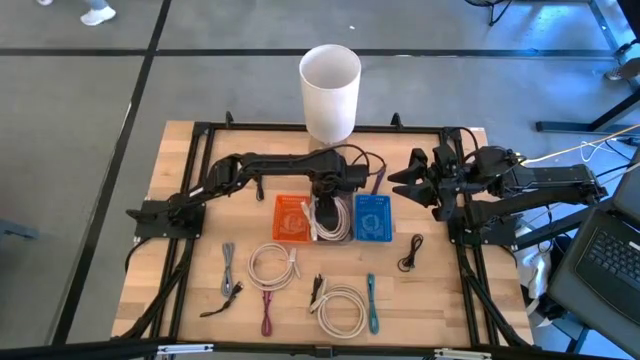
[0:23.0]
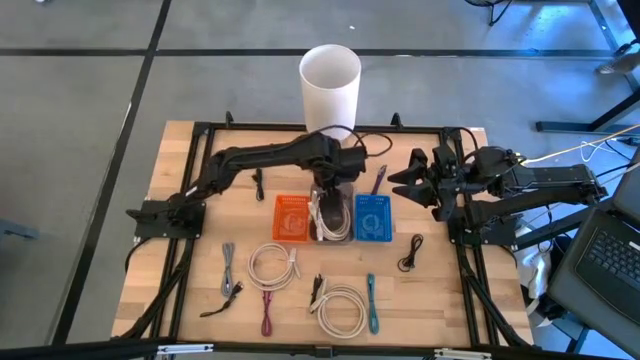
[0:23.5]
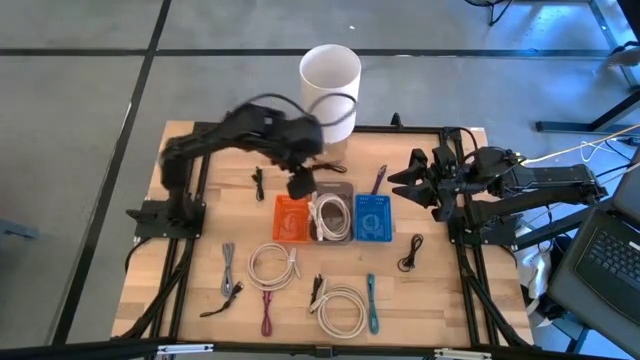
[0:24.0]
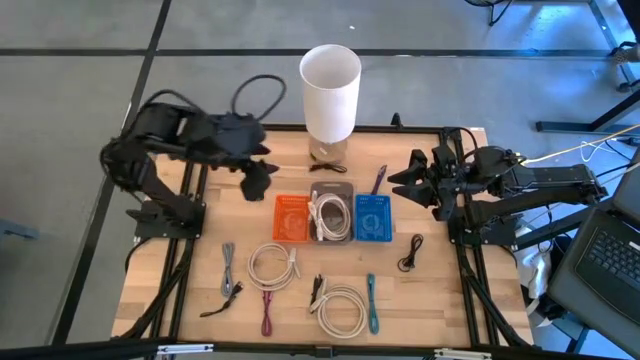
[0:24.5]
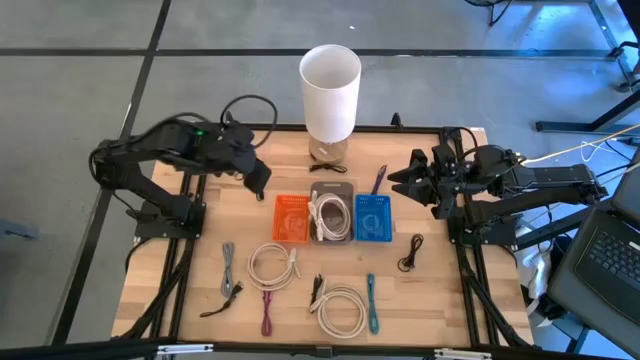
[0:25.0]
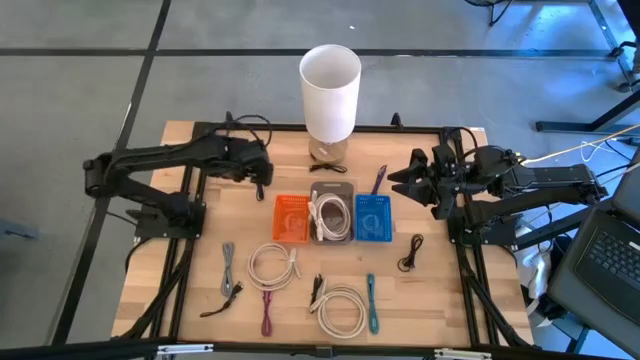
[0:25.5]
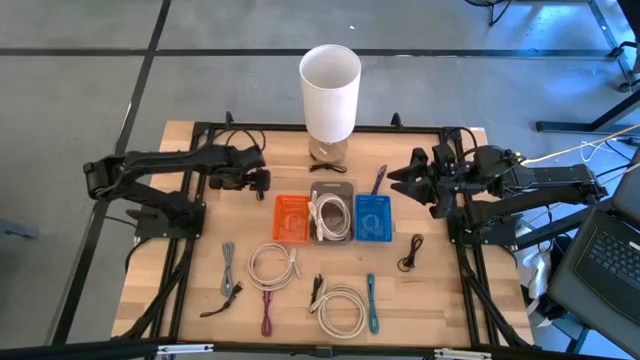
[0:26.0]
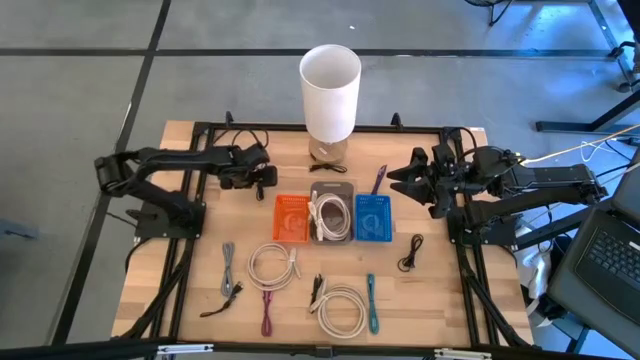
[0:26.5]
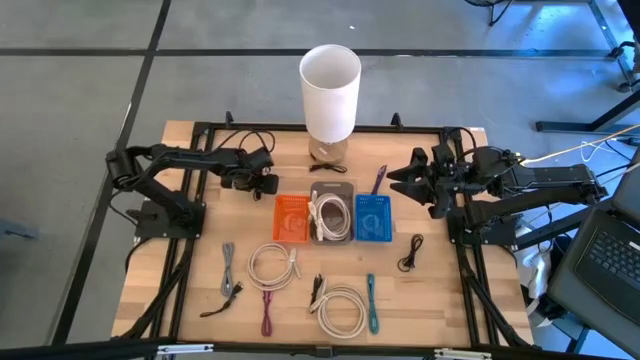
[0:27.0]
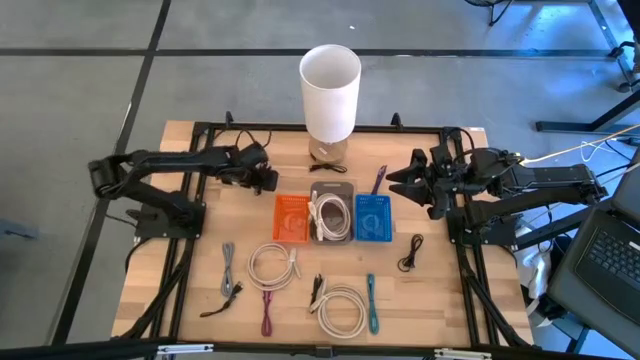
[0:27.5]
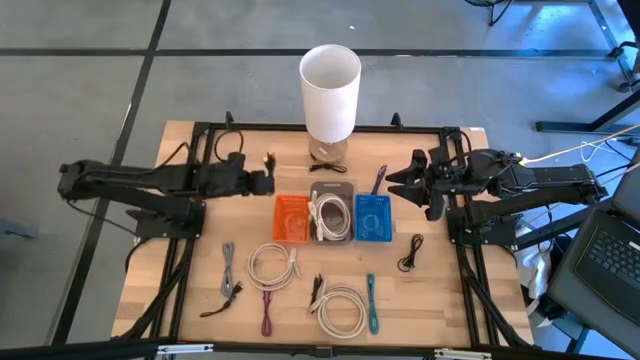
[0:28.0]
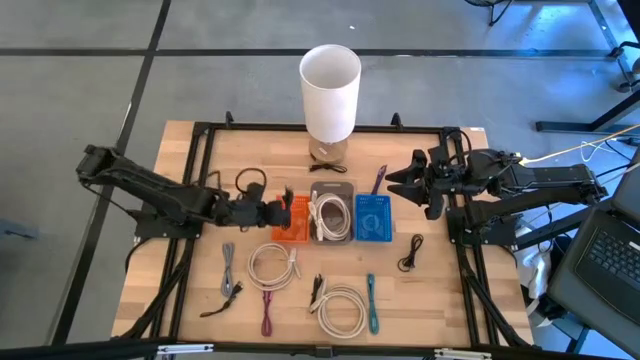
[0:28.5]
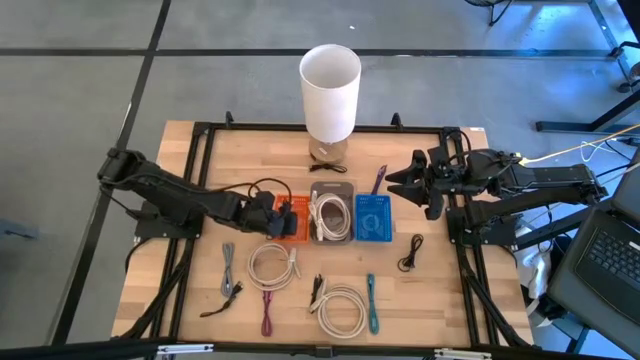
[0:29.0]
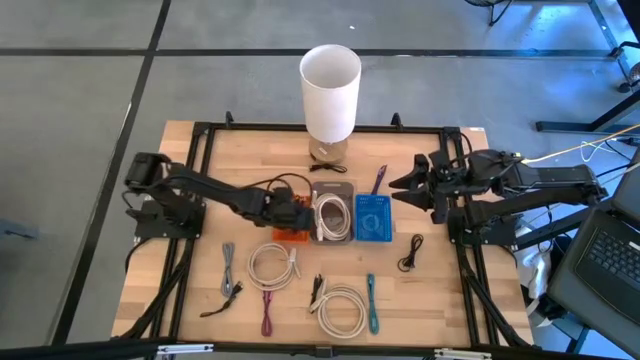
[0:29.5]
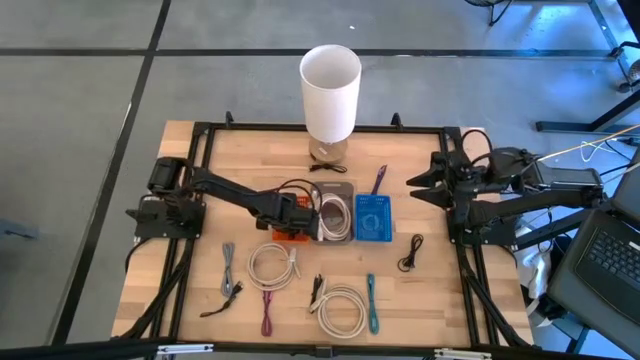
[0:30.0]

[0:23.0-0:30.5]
Task: Pick & Place USB Port
Put the black charger cable into the orange bin

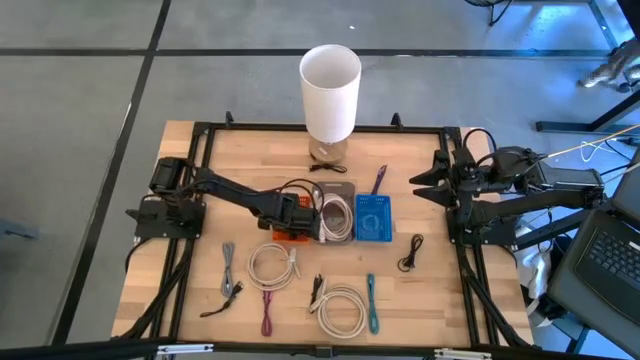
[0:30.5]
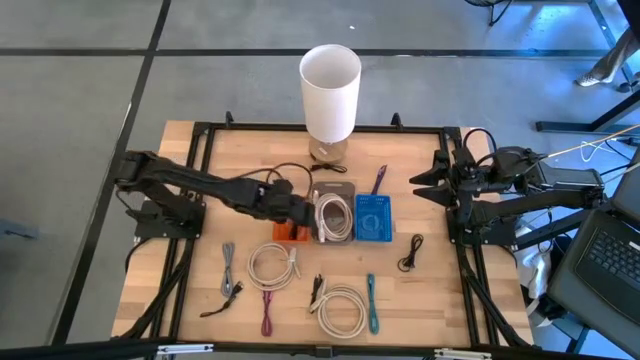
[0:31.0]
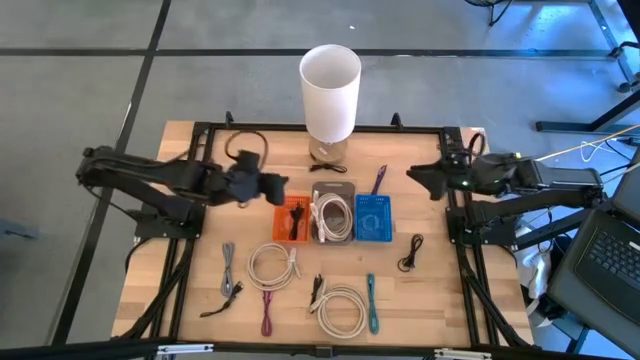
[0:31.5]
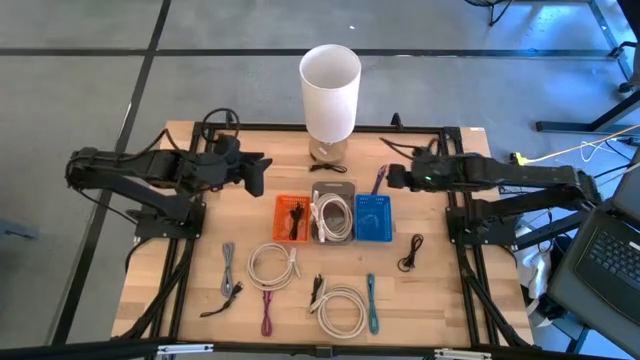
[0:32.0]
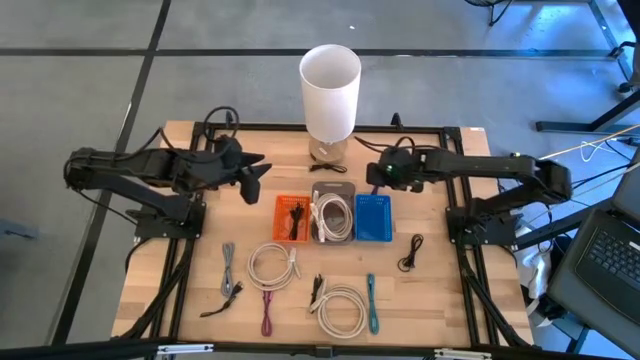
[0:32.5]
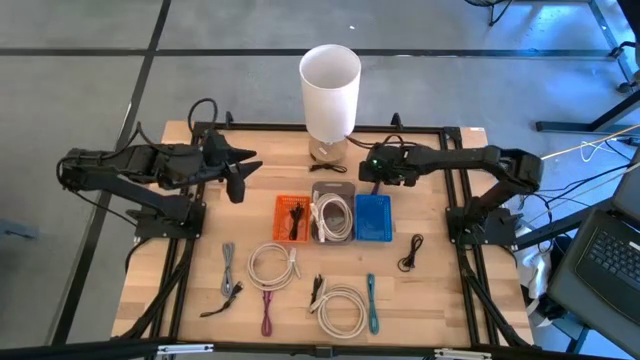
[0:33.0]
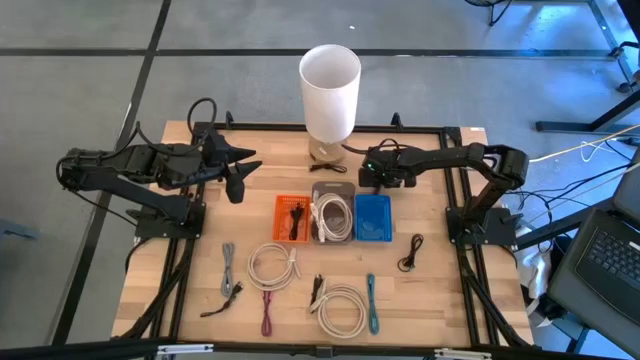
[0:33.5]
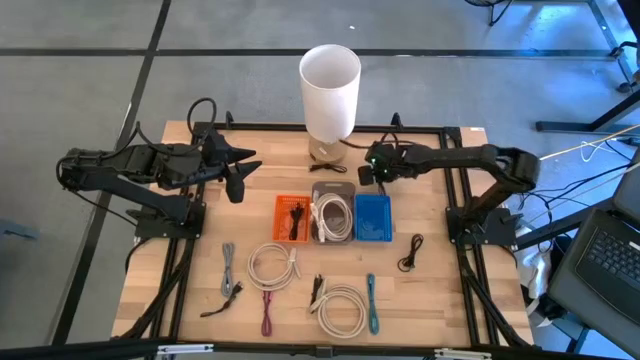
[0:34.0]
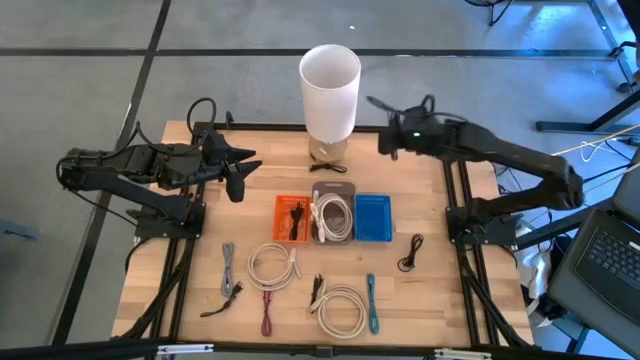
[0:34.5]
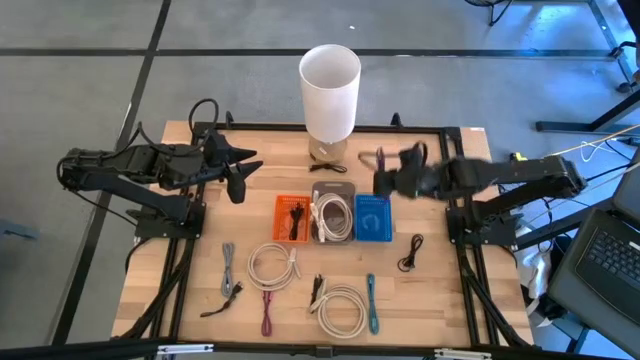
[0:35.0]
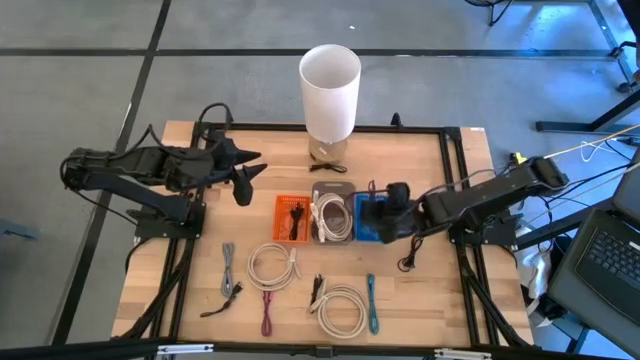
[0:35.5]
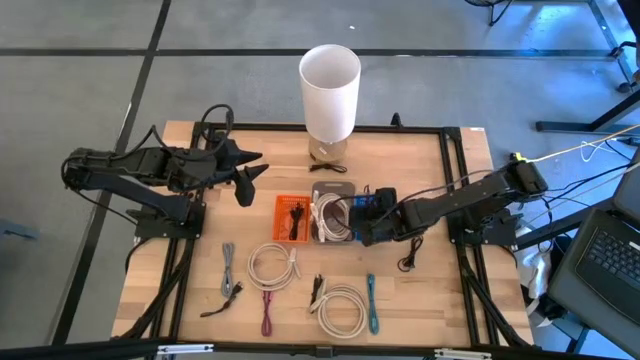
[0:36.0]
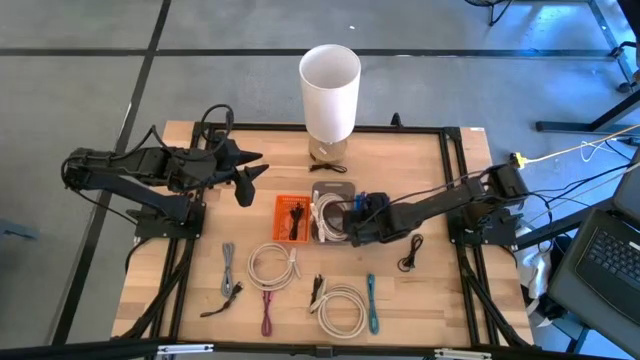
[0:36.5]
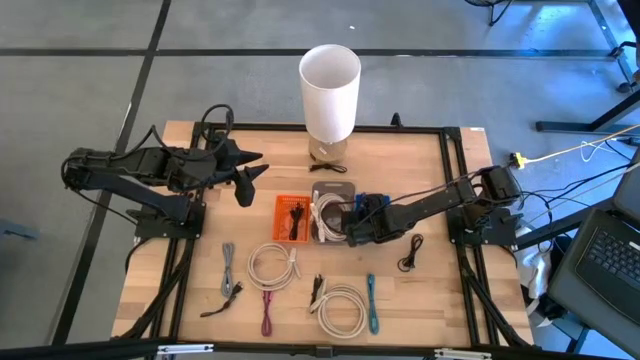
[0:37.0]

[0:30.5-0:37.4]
Put the purple charger cable into the blue bin

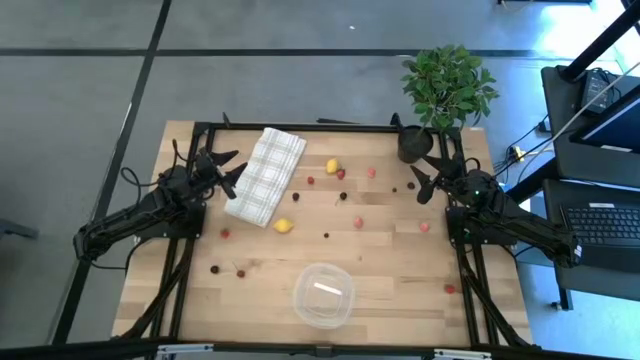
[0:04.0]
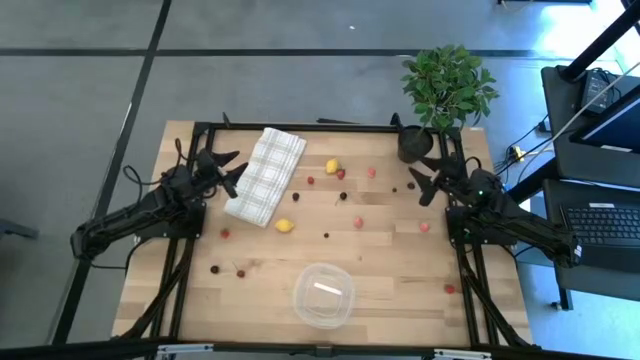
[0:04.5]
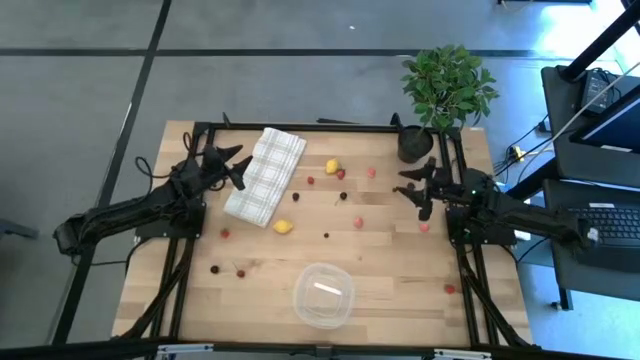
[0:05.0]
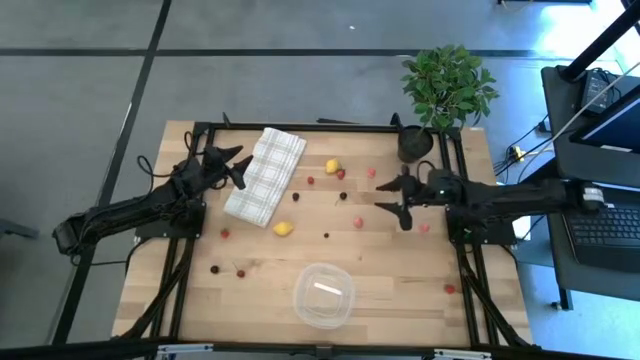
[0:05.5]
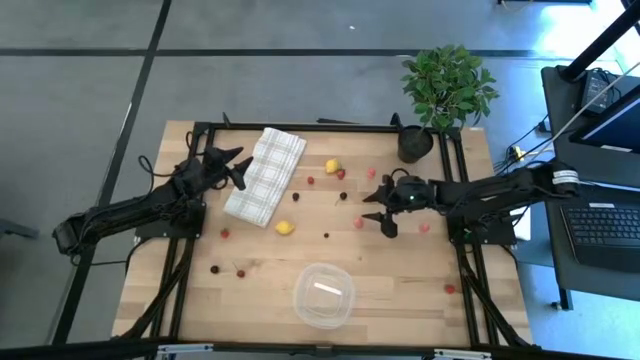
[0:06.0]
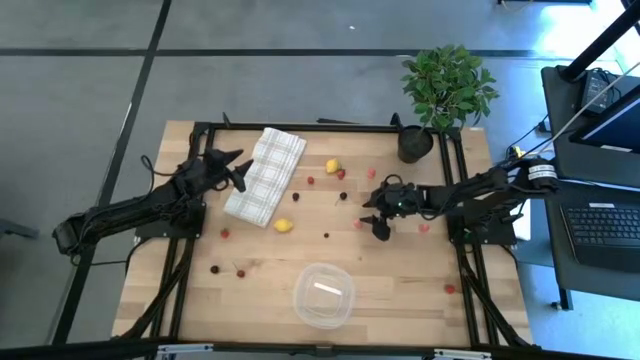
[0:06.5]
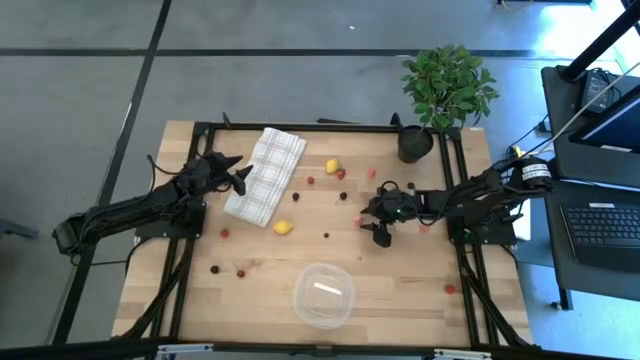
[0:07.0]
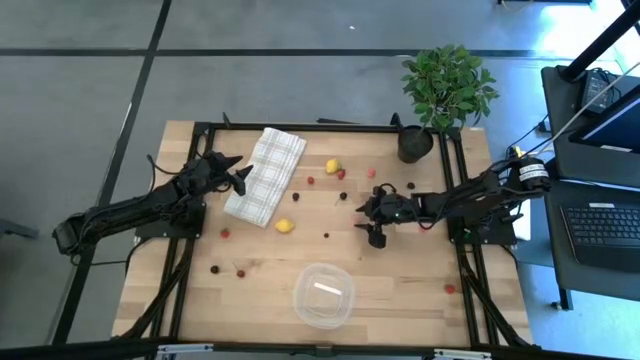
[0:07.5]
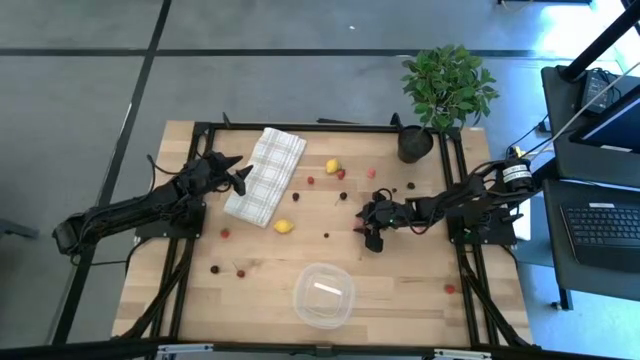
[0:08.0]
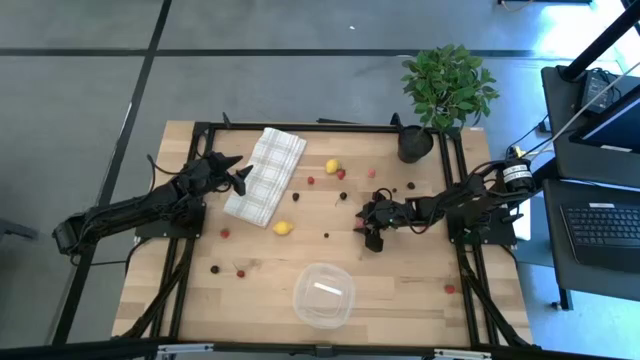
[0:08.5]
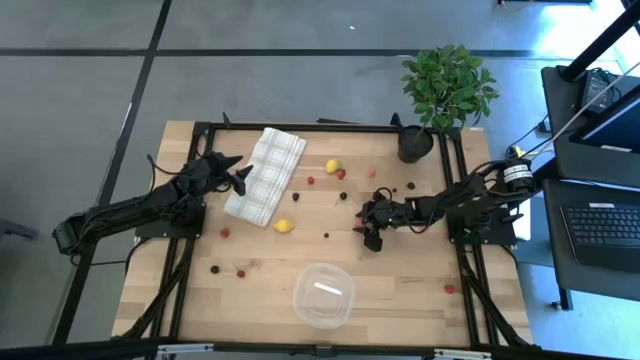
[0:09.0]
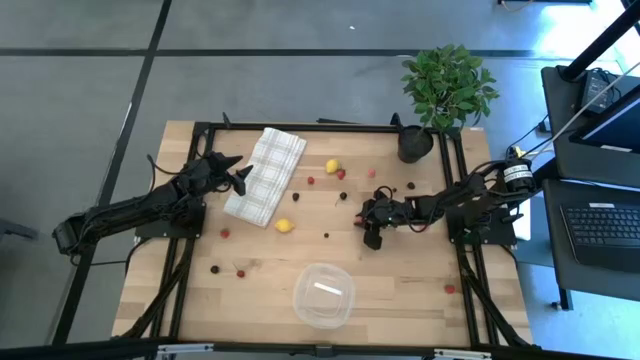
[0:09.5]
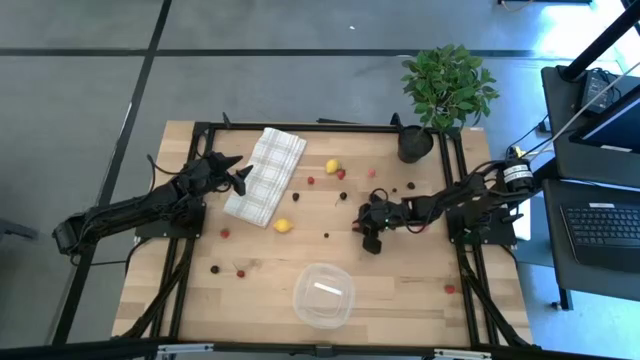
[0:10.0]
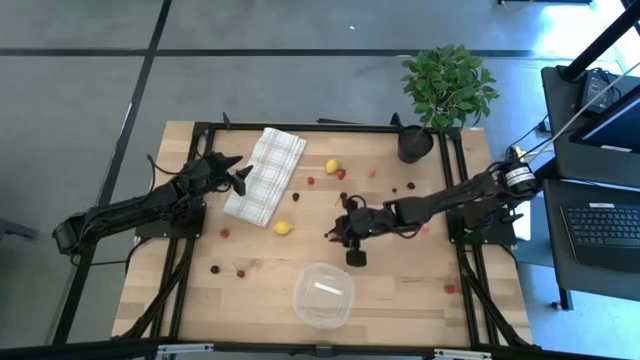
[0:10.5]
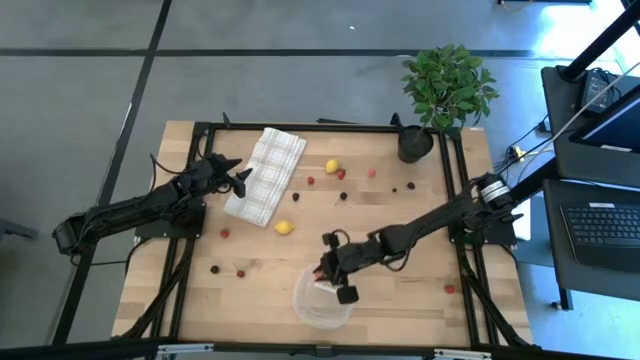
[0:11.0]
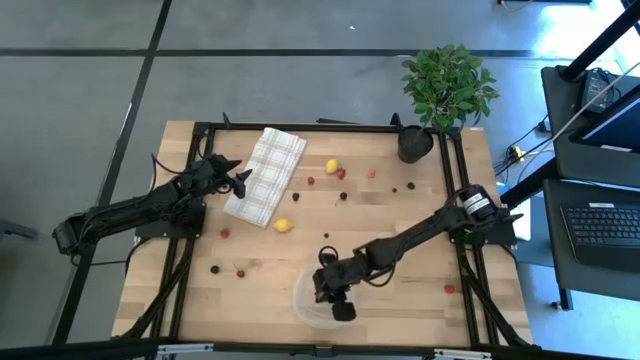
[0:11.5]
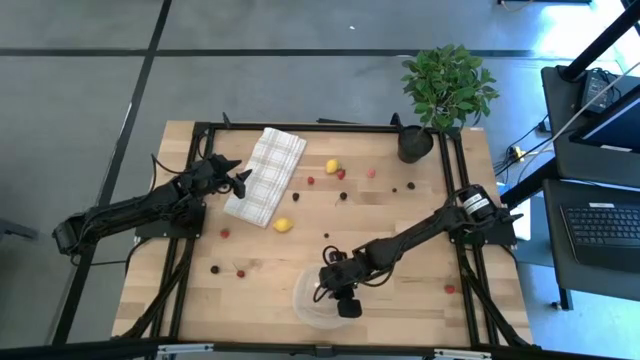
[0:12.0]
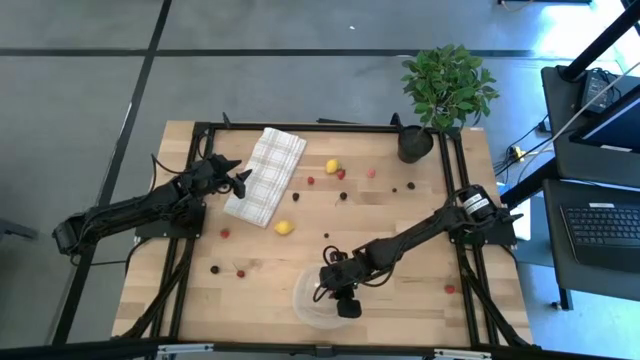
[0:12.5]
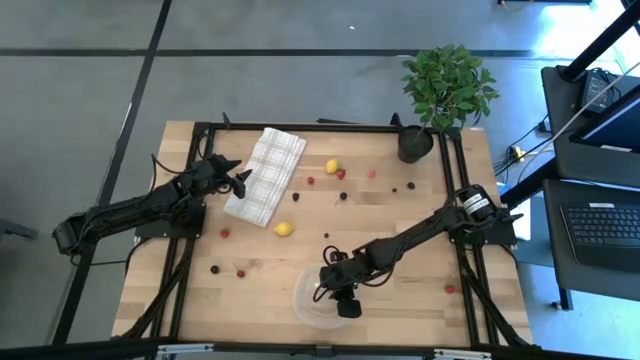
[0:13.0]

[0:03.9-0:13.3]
Task: Pick and placing Produce into tupperware
Put the left peach into the transparent bin
